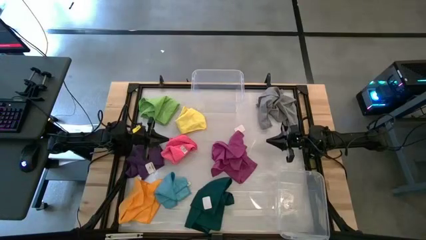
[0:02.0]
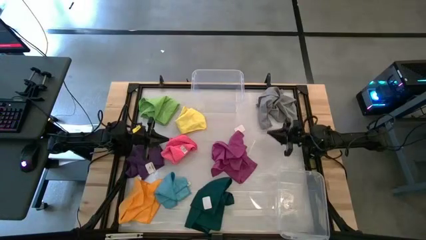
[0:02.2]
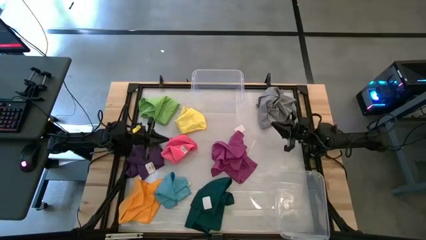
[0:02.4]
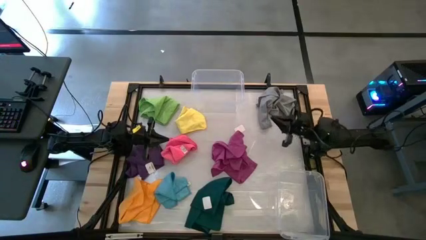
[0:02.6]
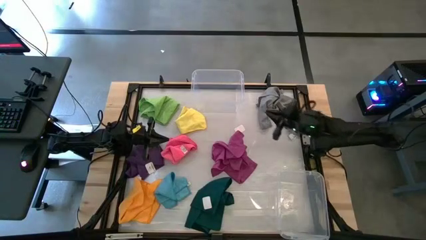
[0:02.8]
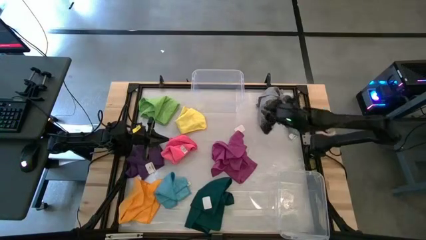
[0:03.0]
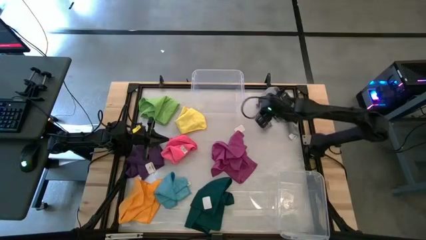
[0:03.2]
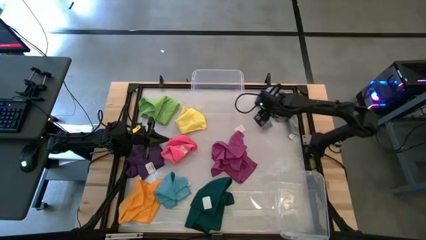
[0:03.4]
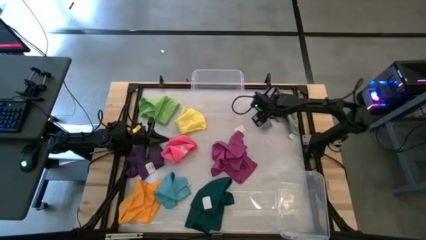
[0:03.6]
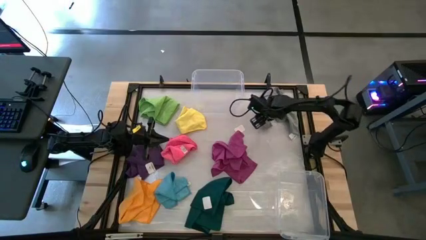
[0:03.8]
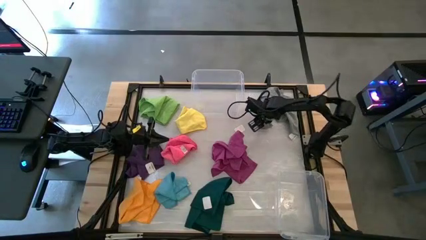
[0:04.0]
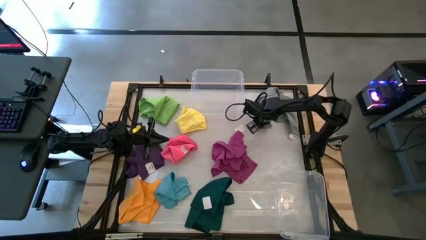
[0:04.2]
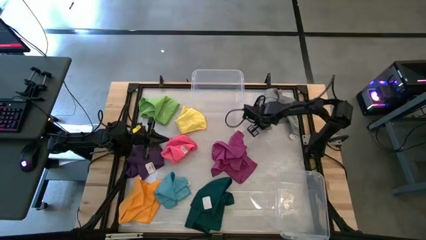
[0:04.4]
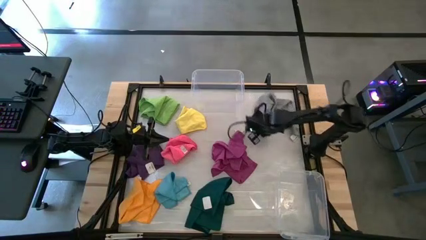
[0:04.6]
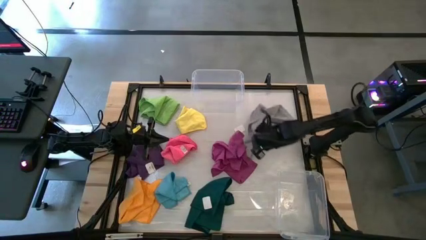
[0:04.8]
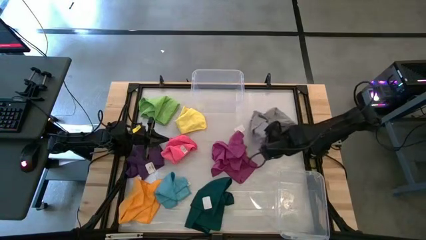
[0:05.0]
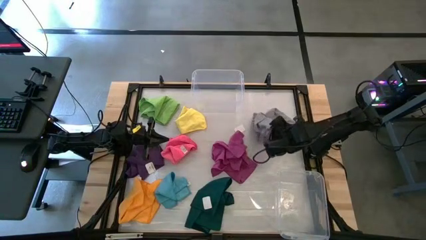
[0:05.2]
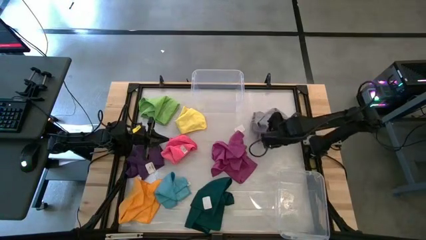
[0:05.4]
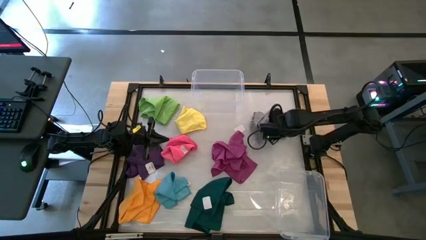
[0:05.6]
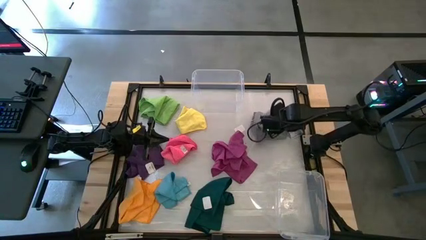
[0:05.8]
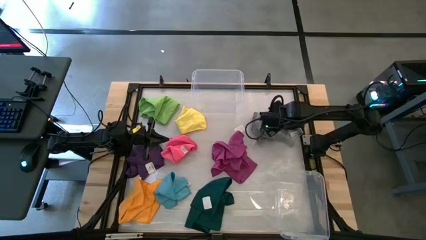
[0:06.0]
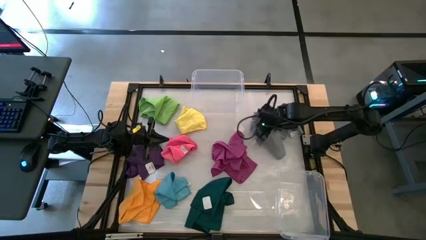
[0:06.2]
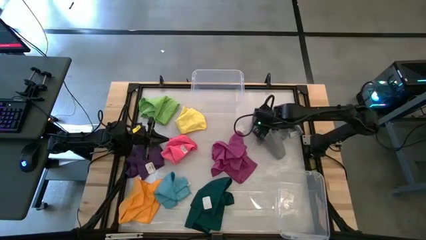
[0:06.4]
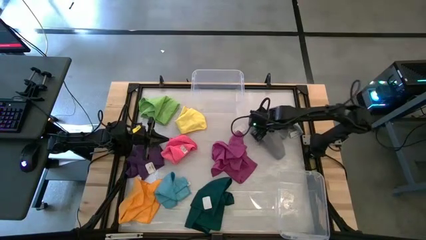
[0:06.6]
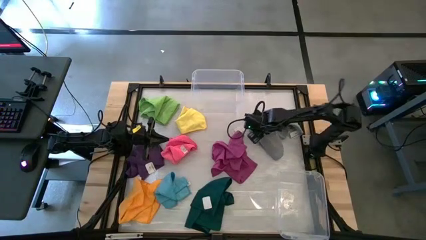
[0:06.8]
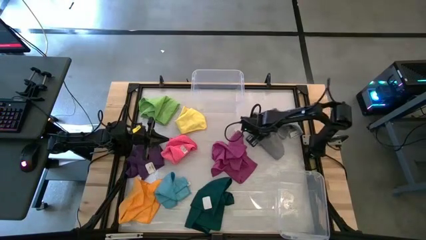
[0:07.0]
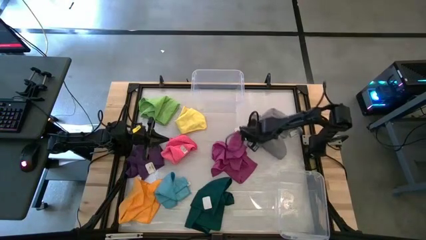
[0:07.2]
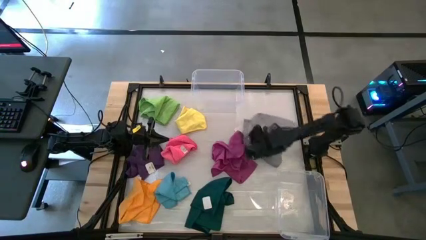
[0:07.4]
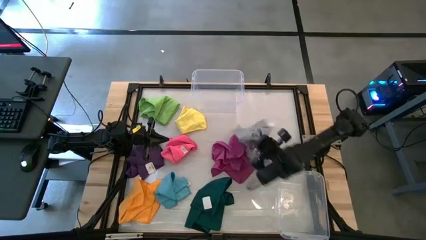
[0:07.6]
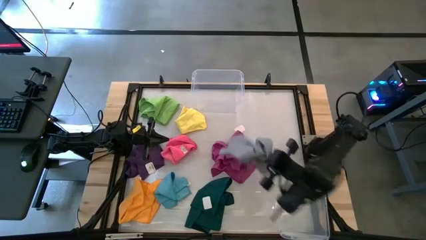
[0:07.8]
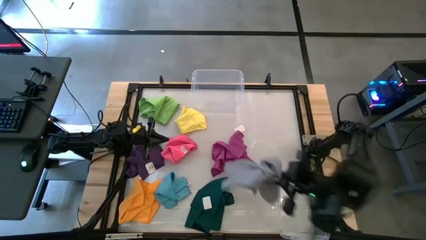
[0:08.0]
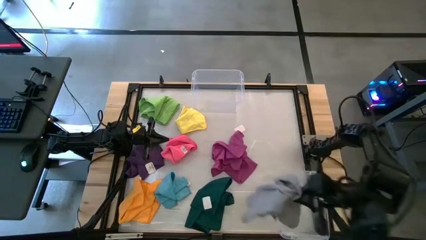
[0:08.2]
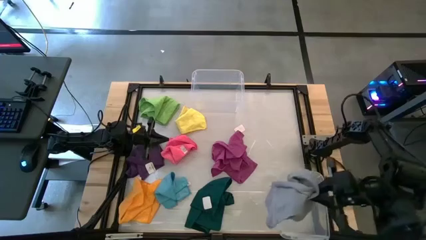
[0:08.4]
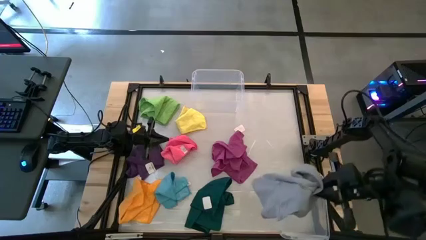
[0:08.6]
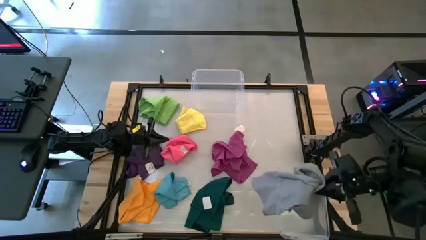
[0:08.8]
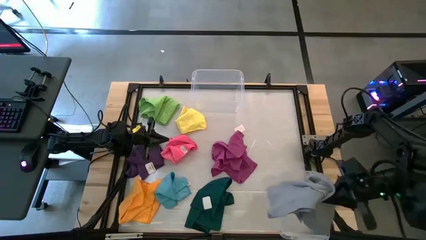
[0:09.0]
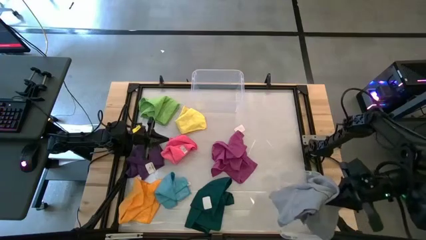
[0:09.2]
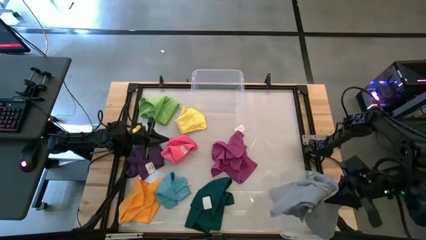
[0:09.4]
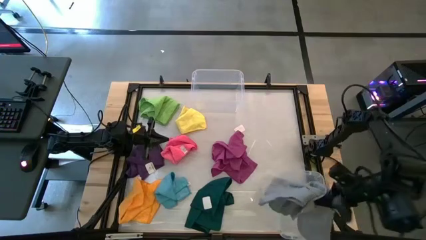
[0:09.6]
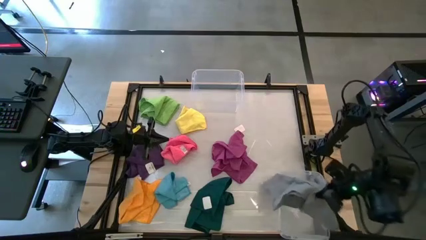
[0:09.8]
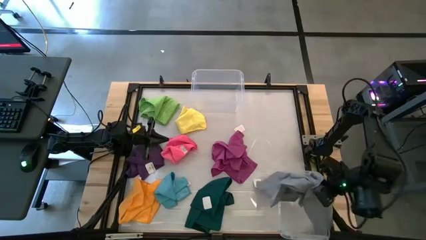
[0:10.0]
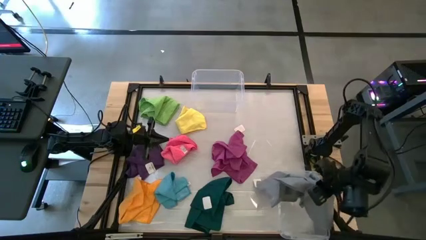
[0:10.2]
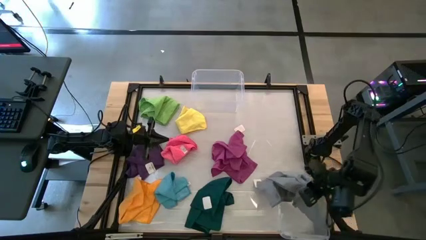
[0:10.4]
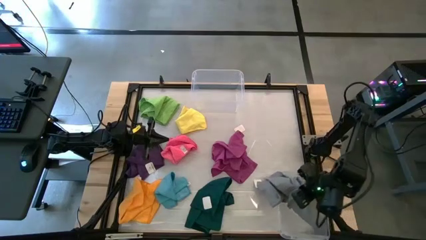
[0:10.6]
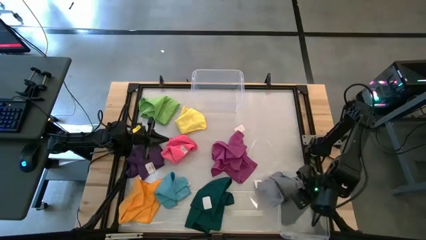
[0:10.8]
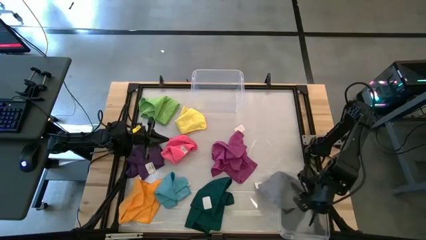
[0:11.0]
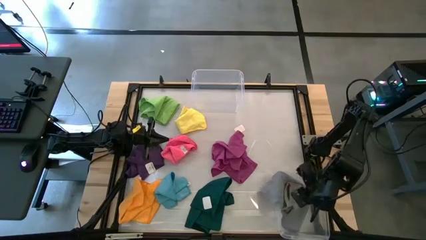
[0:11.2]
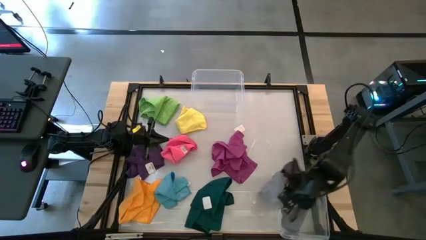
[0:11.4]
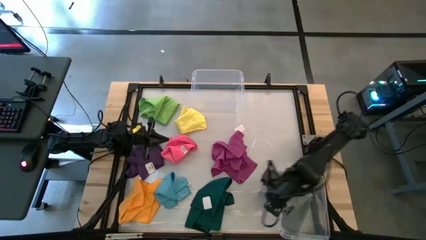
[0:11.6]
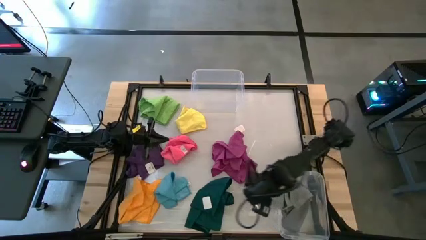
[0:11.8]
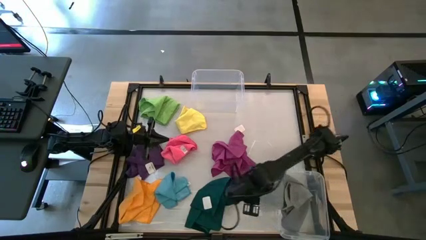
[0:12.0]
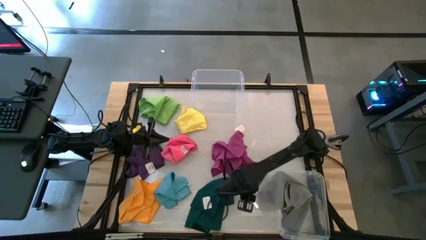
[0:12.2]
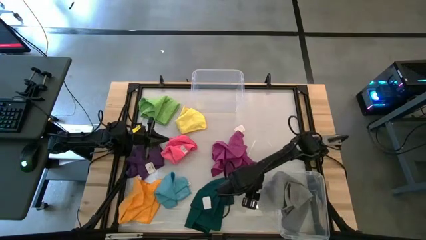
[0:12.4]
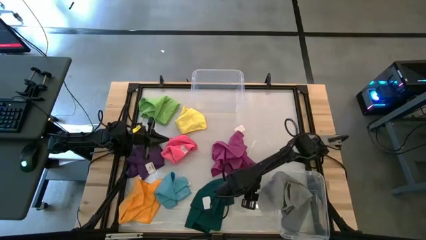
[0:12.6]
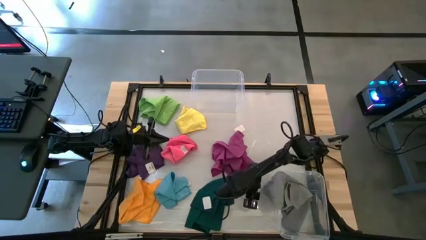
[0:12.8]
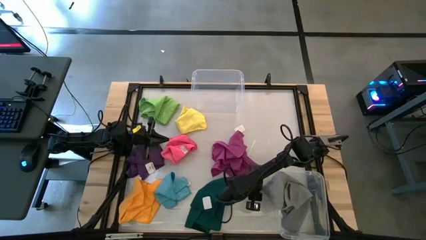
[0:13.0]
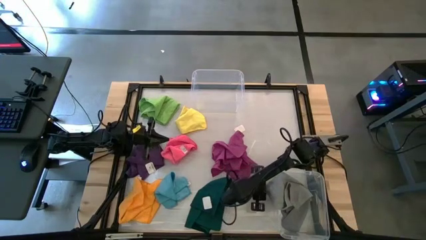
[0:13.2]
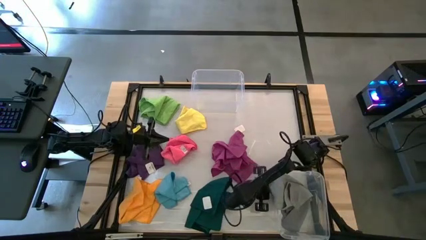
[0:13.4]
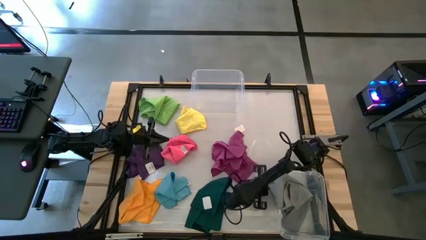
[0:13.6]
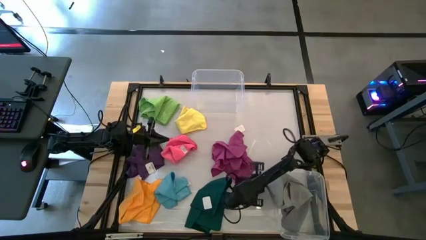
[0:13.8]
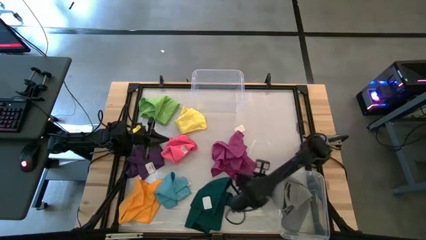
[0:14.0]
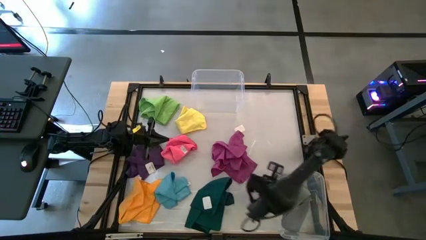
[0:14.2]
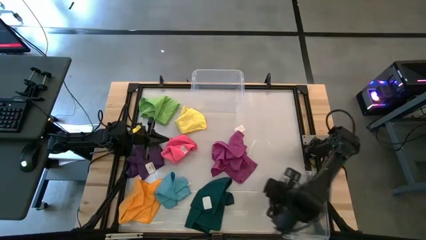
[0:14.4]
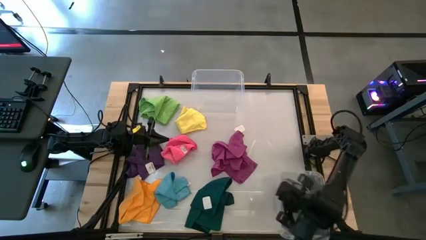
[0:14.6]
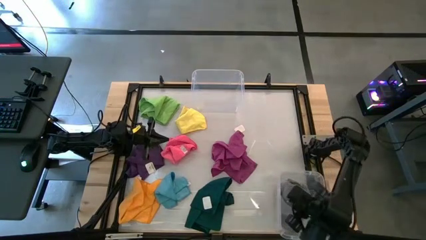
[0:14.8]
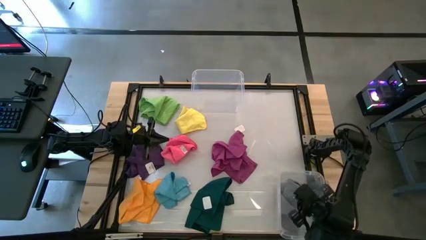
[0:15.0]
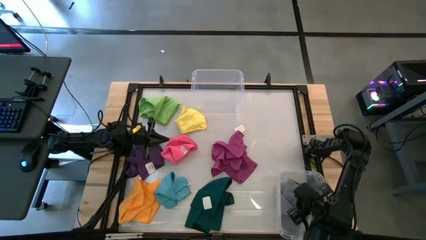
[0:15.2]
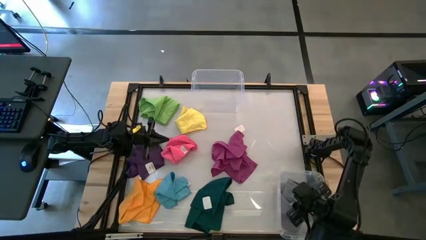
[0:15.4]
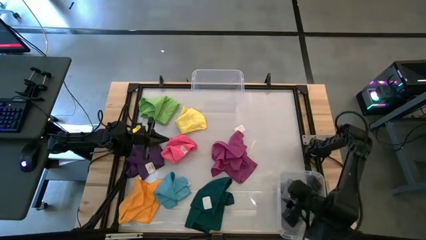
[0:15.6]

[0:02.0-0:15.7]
Task: Sort towels by color in basket
Put the gray microfiber cloth into the bottom transparent bin

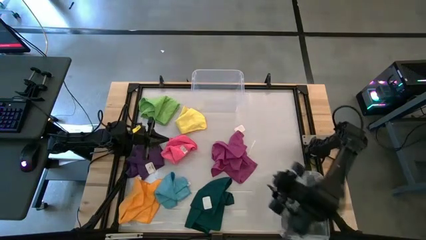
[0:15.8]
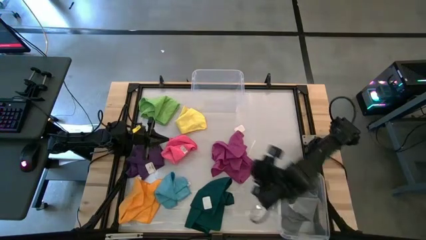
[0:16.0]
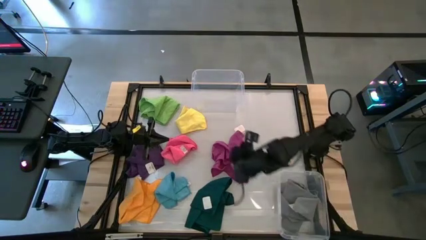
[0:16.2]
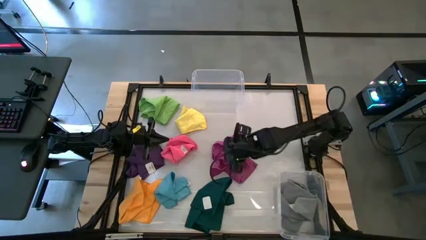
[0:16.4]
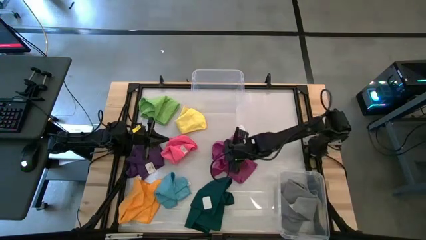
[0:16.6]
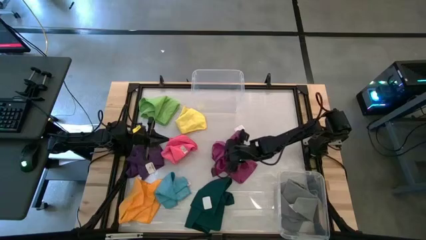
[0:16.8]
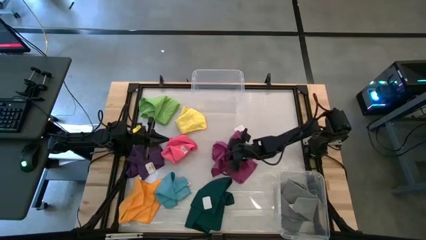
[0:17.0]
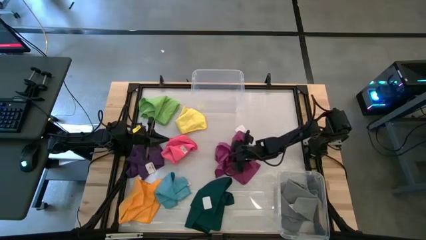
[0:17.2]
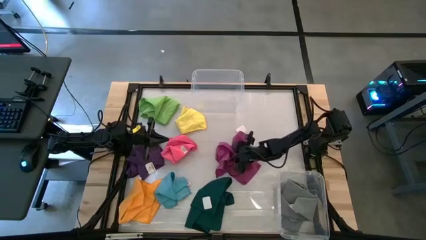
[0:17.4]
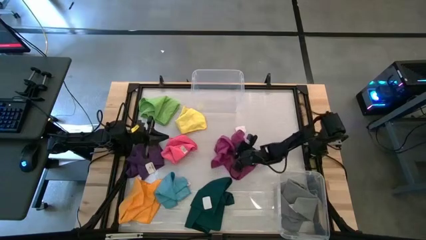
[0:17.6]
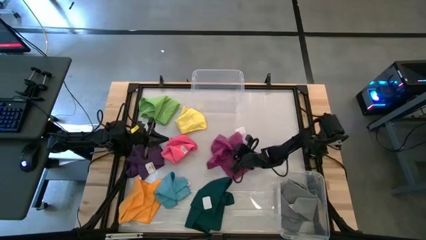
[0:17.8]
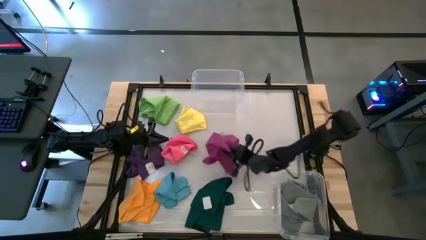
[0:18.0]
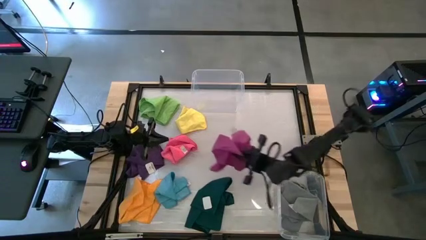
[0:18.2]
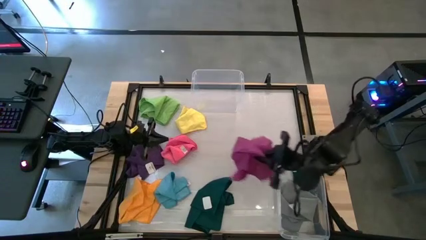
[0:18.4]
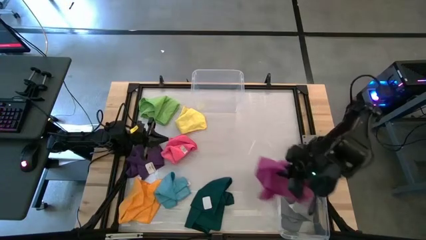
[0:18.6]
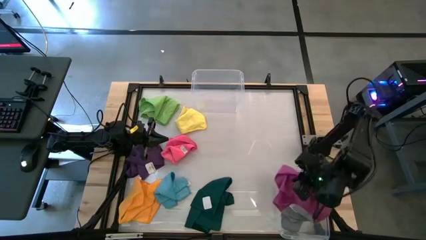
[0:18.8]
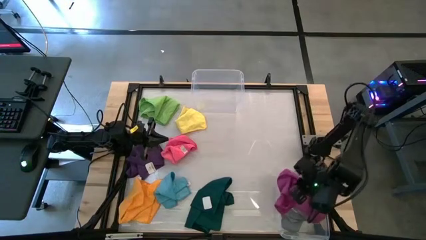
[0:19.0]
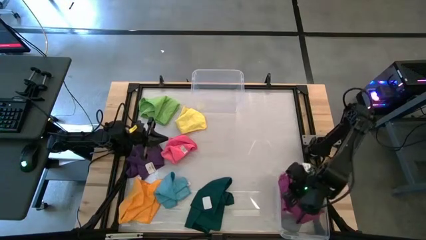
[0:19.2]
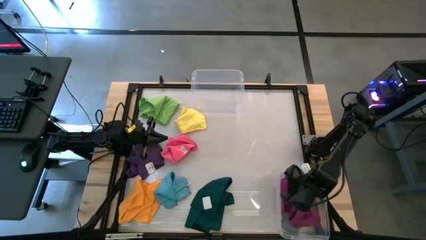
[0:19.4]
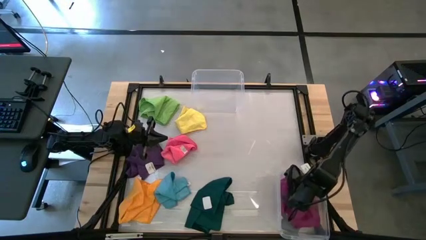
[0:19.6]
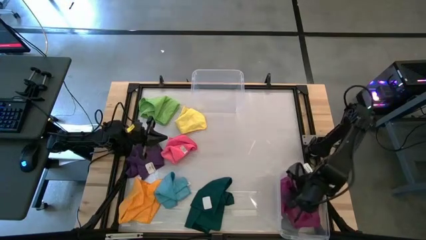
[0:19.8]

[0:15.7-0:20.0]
Put the purple microfiber cloth into the bottom transparent bin
